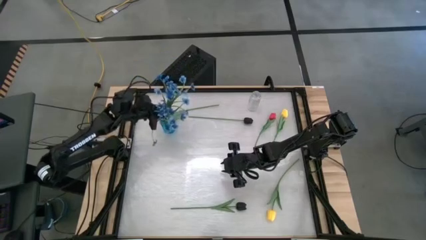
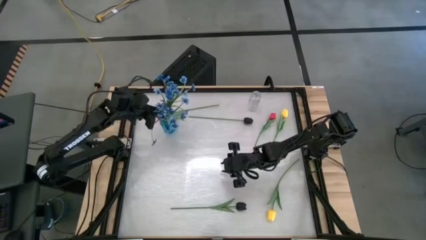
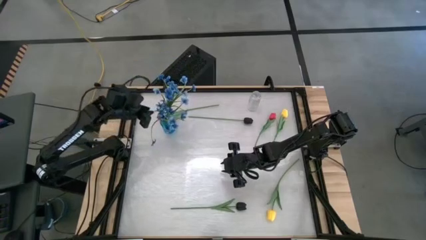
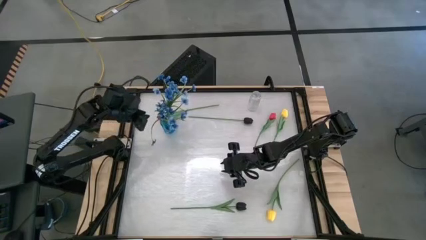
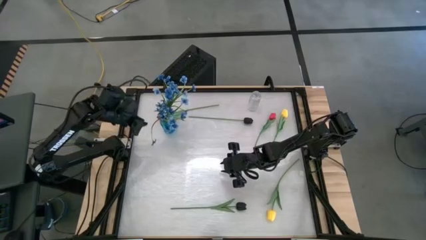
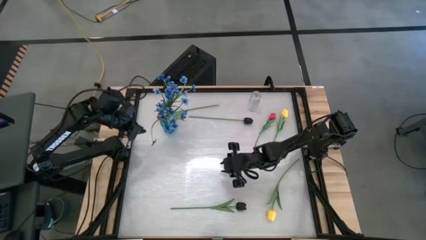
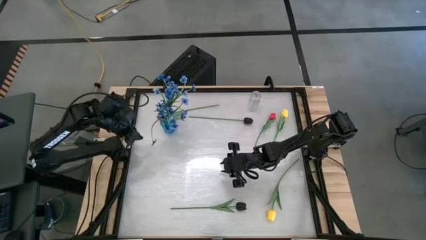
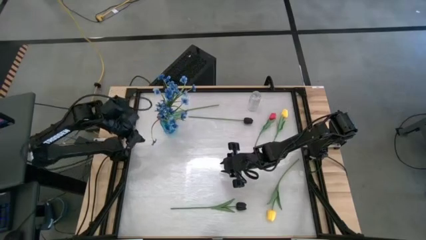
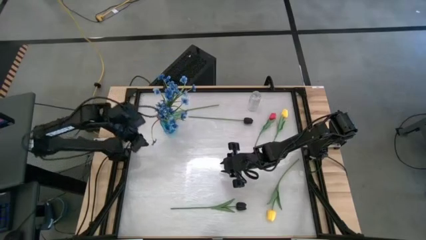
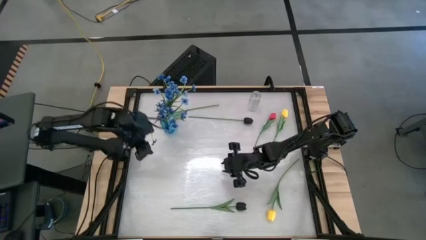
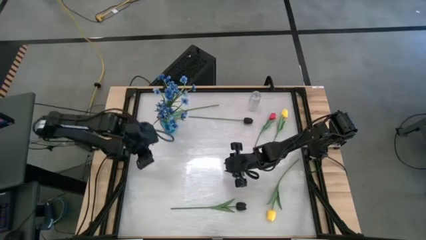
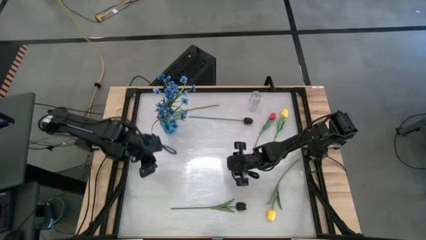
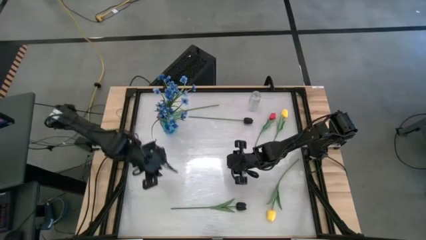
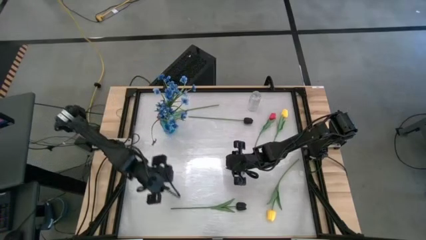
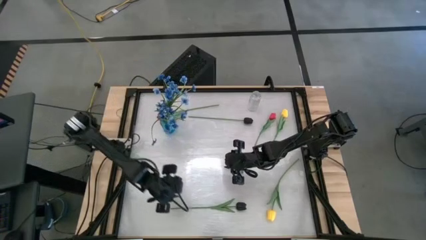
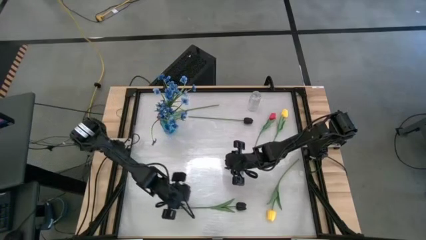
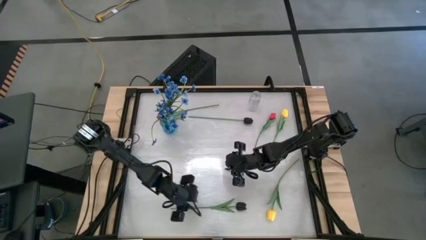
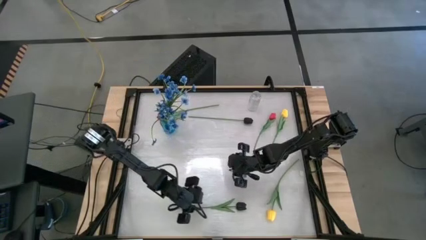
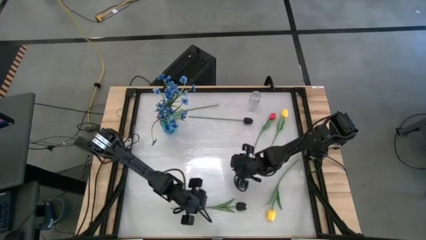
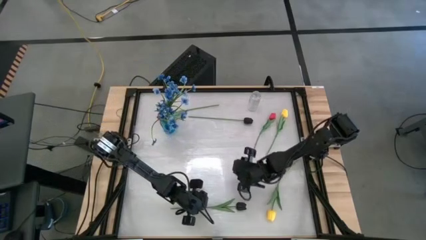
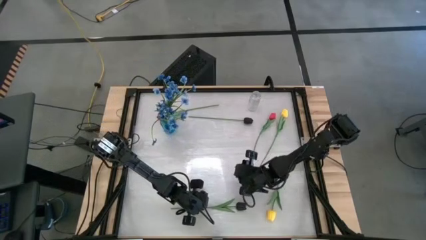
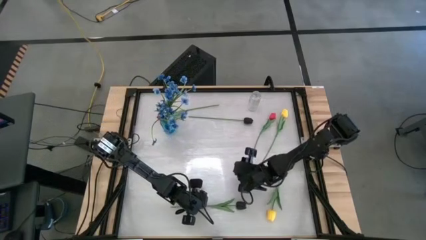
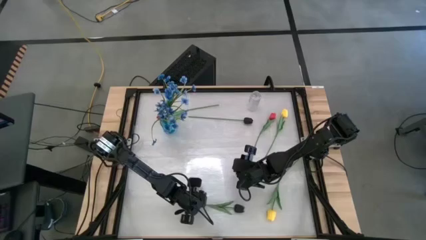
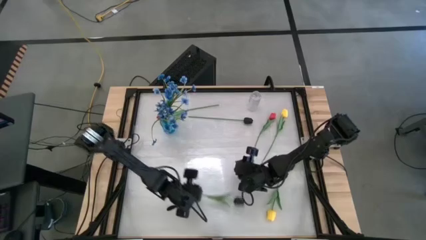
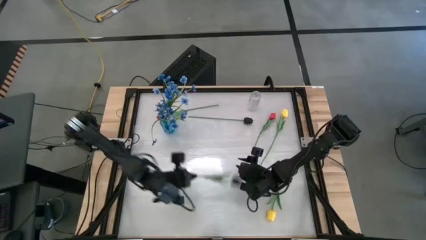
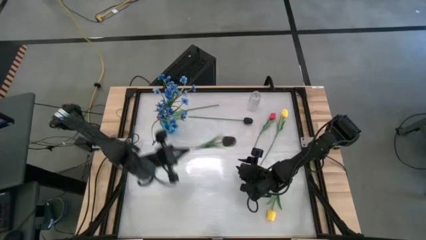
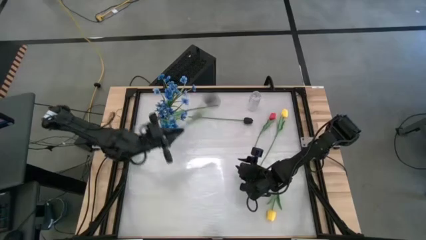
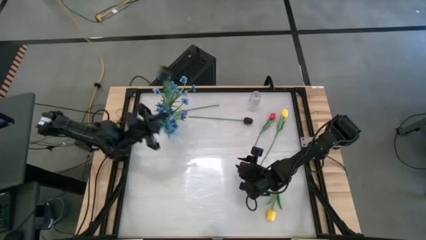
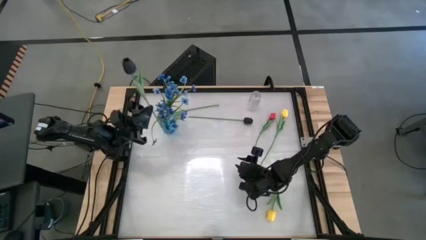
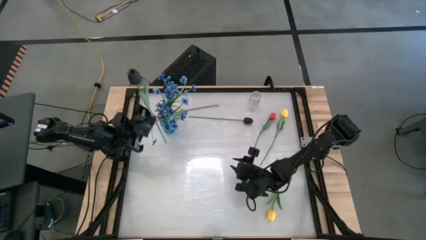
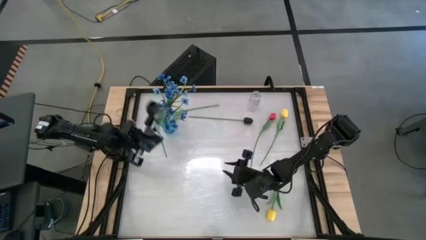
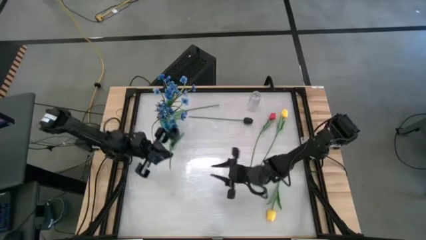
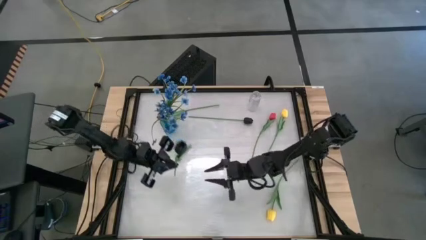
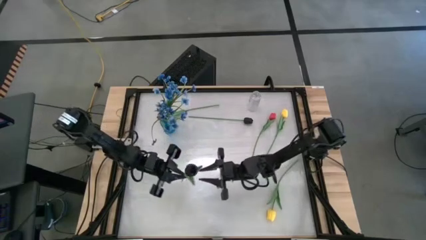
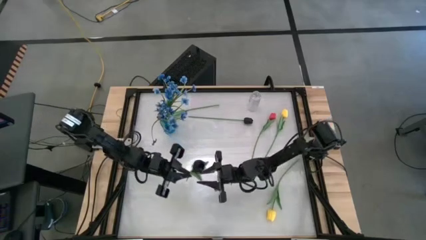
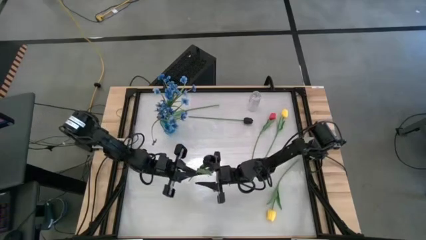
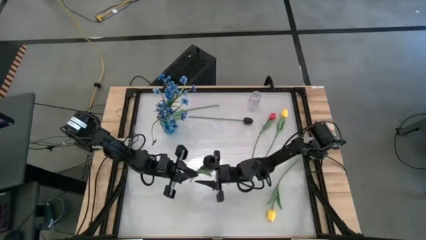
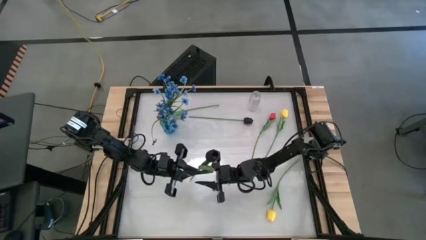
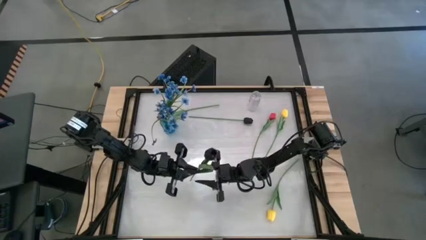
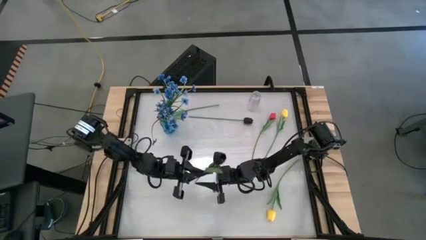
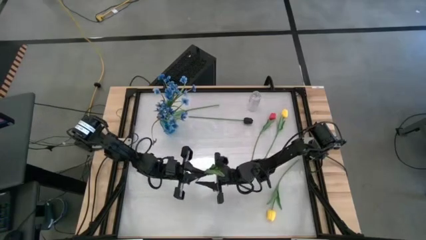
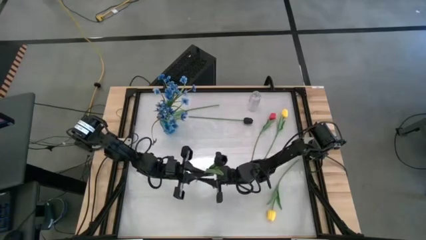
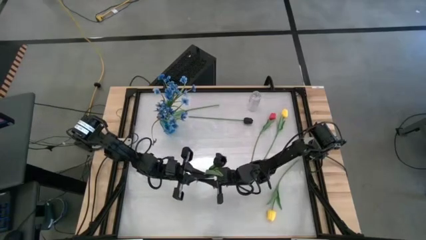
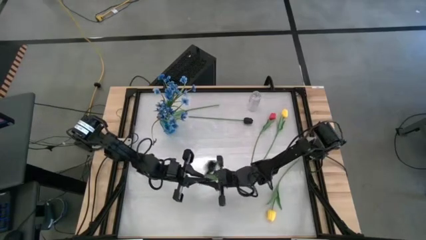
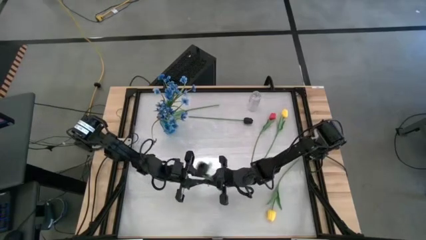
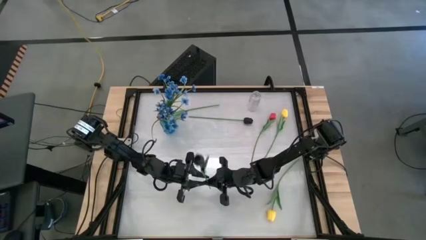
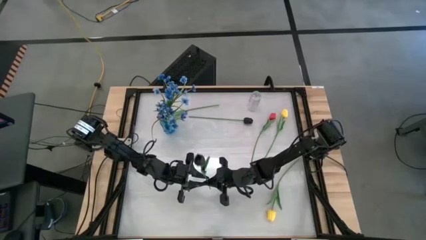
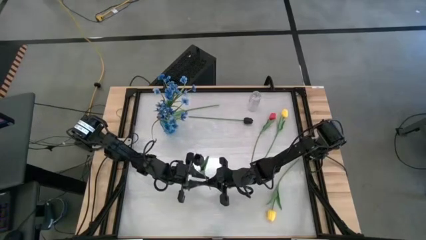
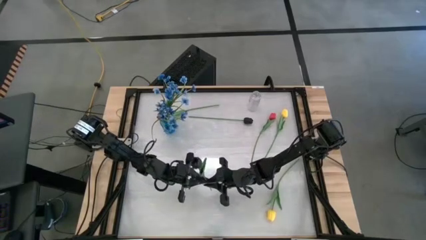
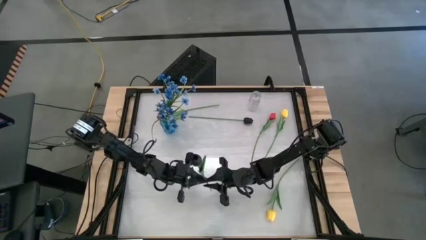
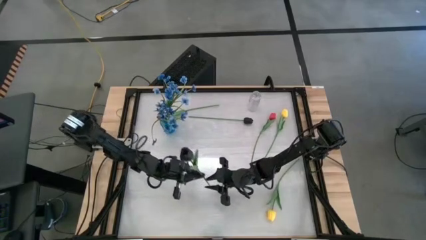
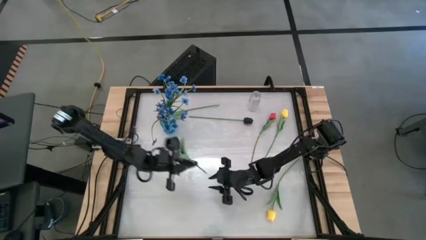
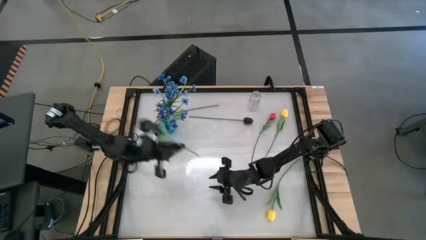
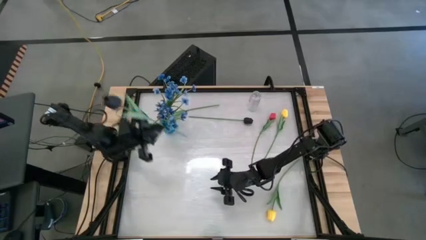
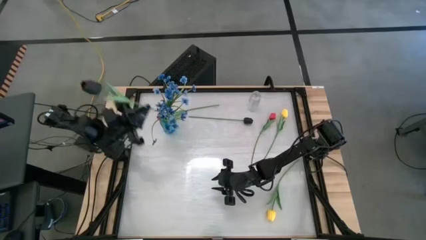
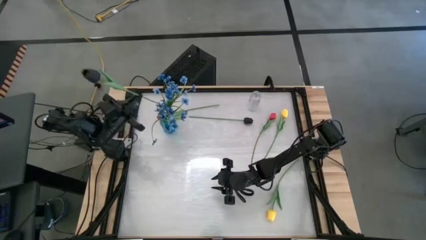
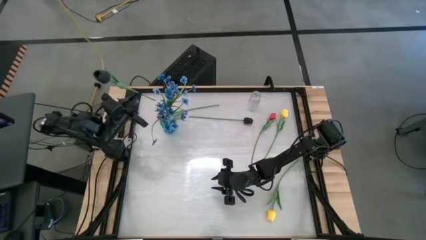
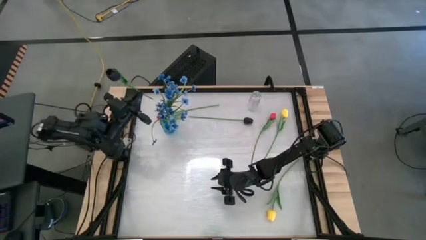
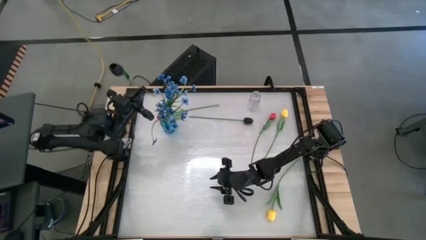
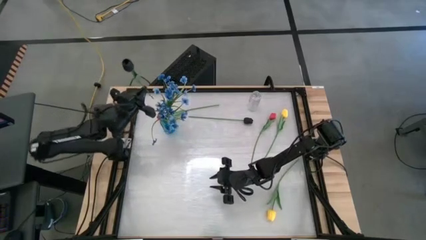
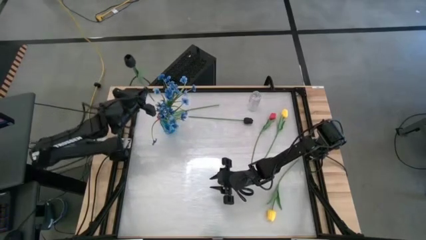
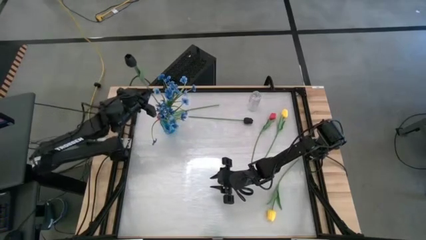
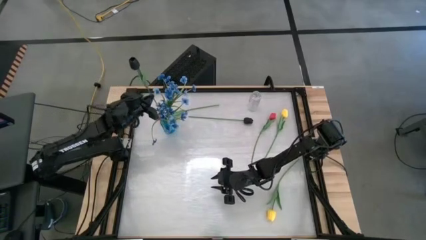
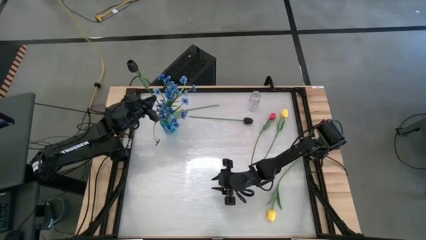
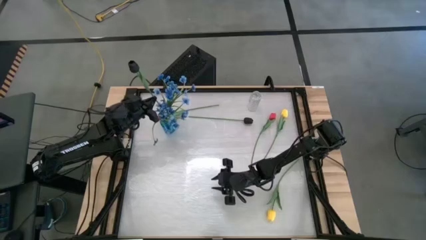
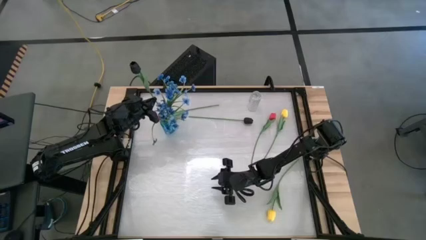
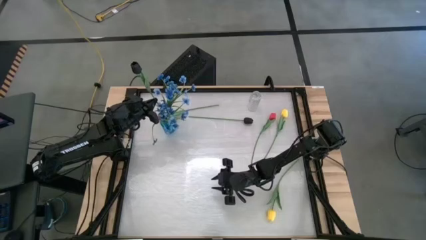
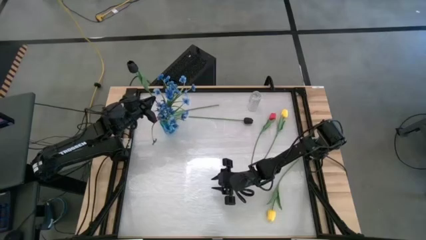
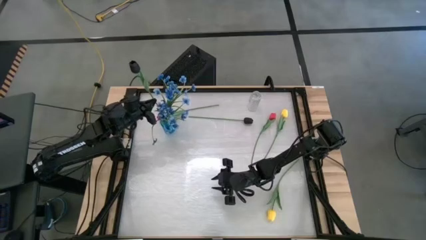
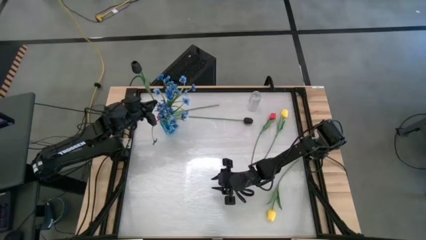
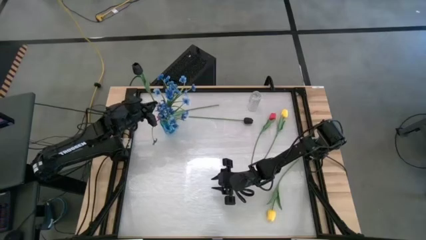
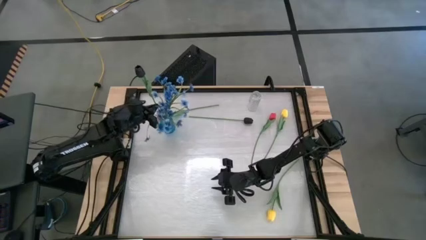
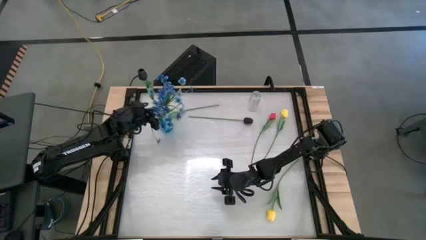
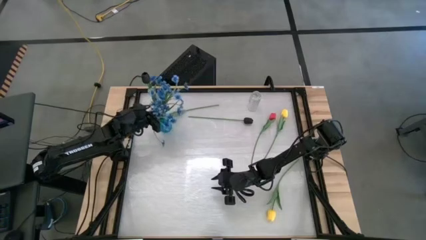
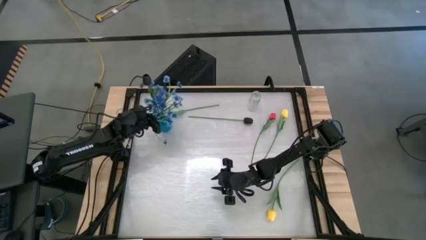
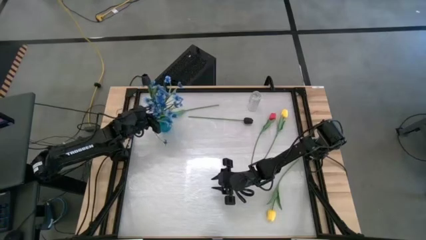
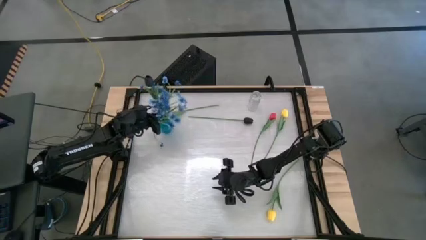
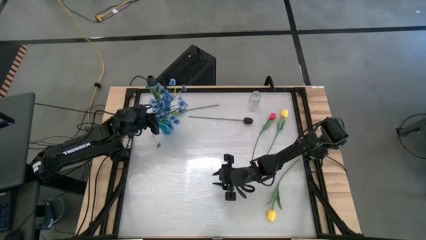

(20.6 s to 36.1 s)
Task: Sort flowers into vase by color
Put the bottom black tulip flower into the blue vase
